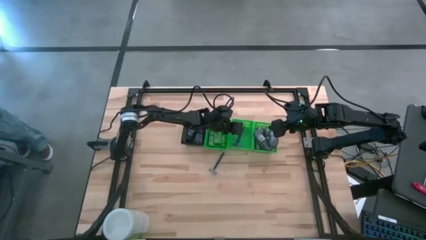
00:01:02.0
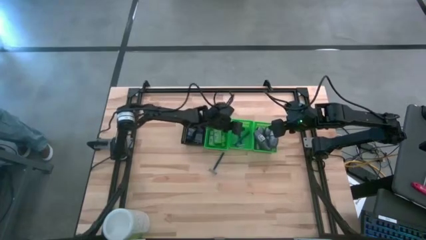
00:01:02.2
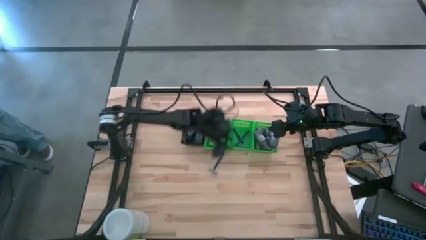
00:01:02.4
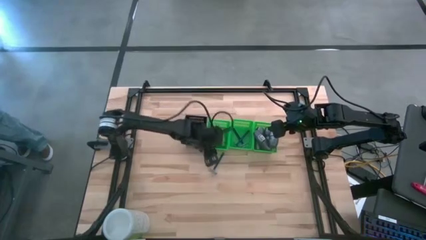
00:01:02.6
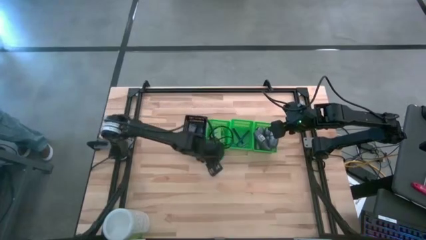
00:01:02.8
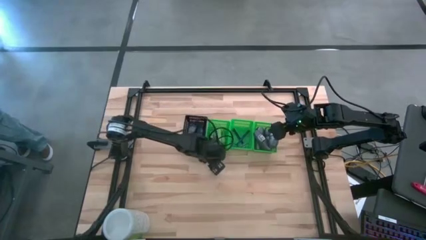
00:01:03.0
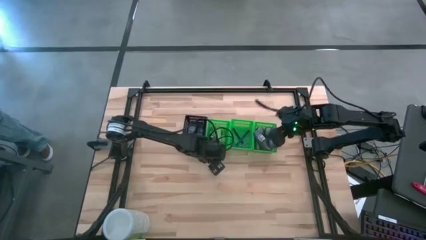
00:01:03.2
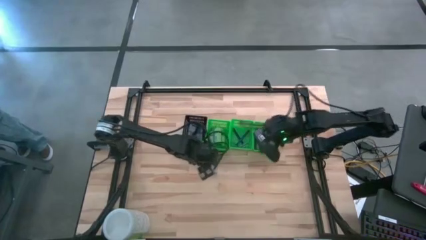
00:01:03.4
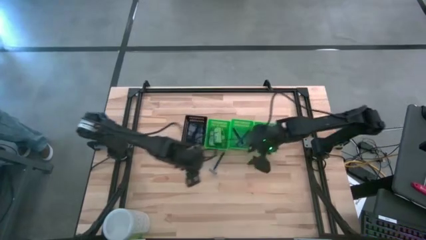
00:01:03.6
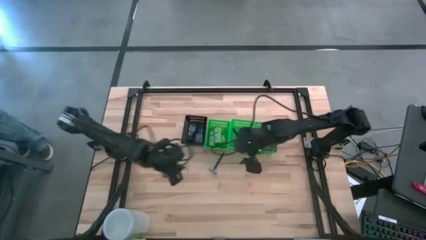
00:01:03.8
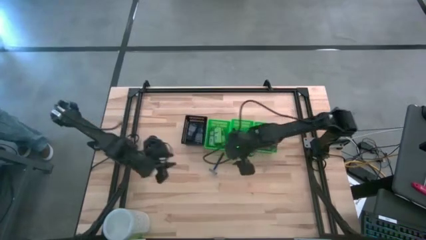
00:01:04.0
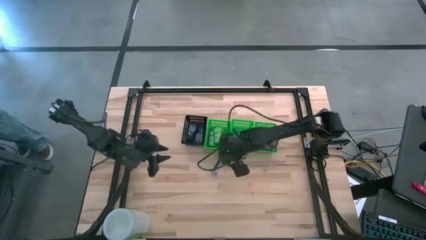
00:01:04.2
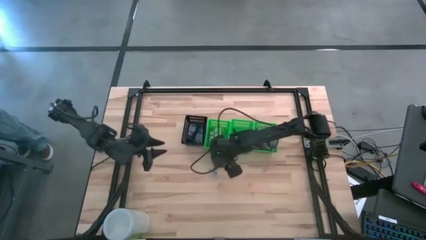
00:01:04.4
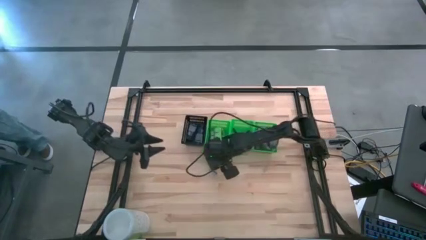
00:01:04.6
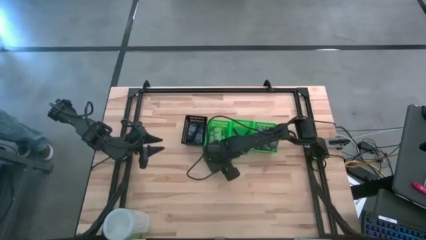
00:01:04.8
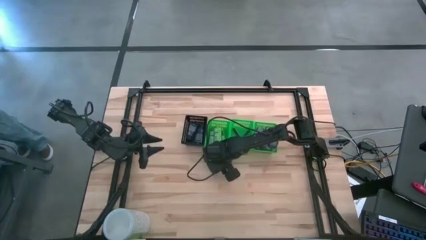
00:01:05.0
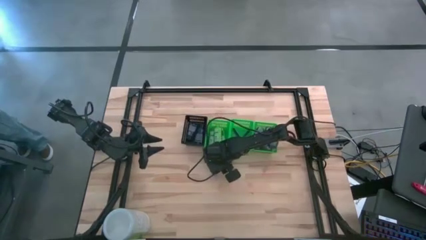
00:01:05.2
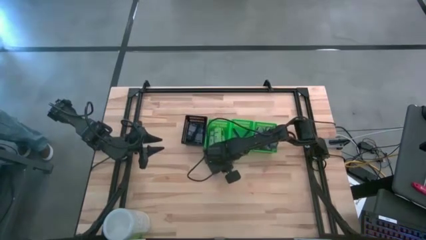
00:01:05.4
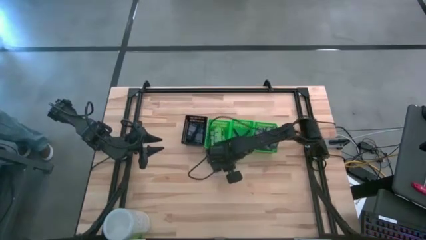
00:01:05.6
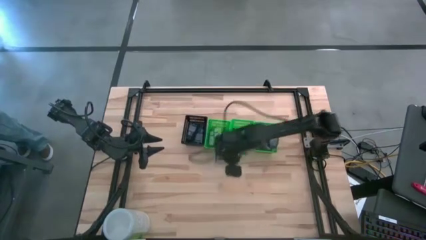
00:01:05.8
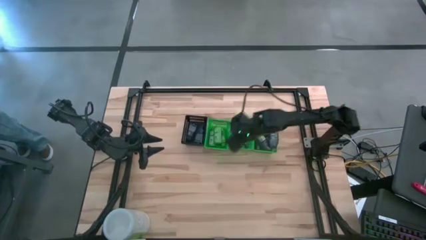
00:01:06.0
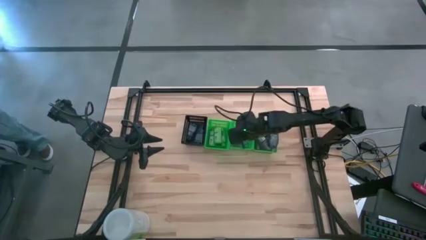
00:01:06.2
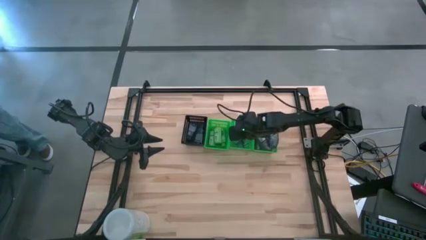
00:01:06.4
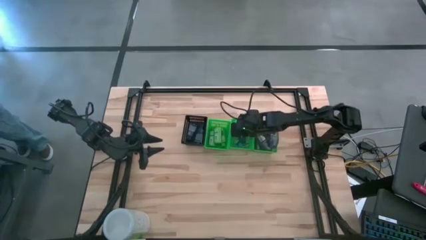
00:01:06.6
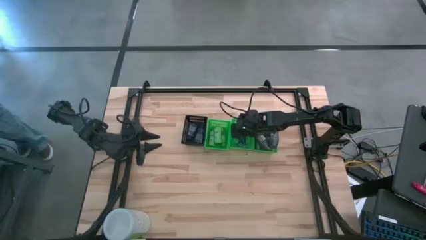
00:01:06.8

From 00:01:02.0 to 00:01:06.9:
Task: Pick & Place Travel size toiletries
Put the blue razor into the middle green basket

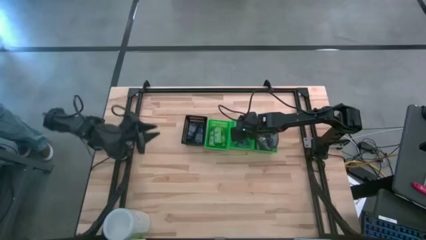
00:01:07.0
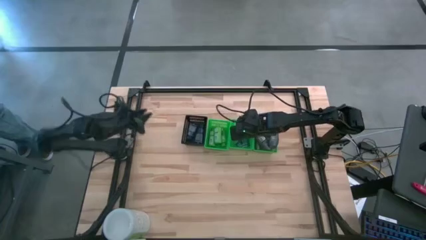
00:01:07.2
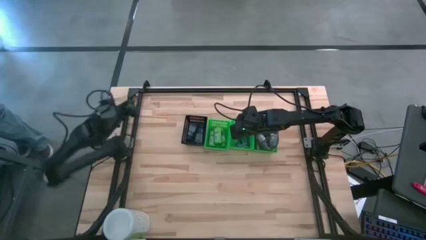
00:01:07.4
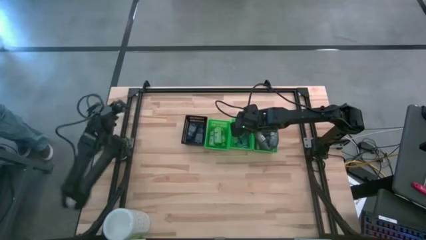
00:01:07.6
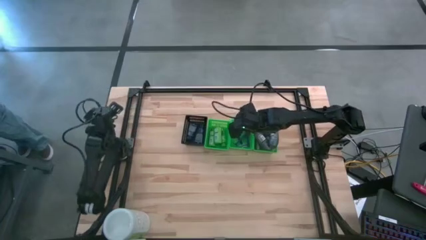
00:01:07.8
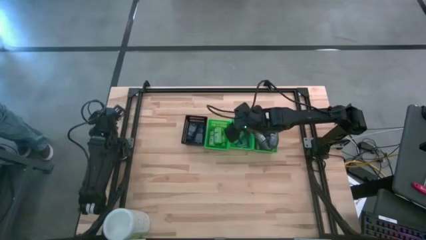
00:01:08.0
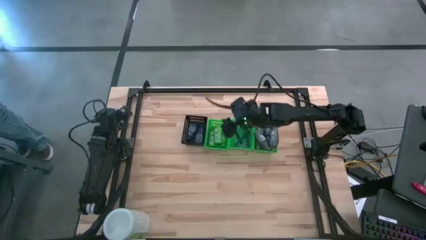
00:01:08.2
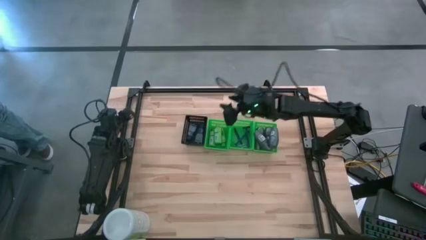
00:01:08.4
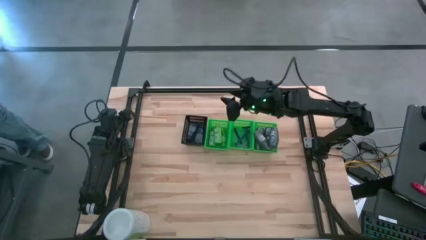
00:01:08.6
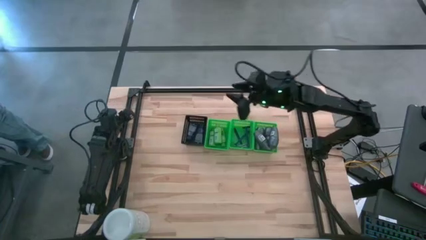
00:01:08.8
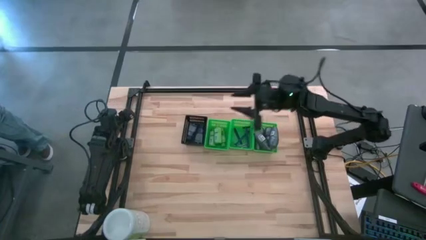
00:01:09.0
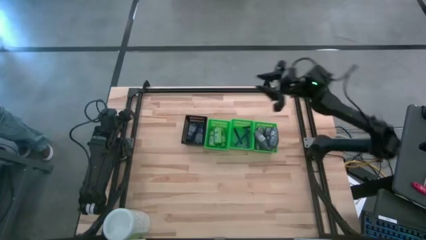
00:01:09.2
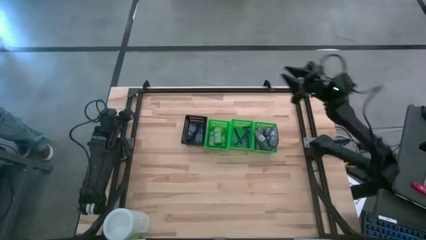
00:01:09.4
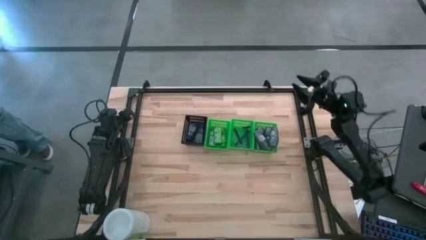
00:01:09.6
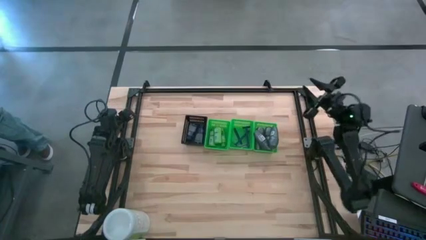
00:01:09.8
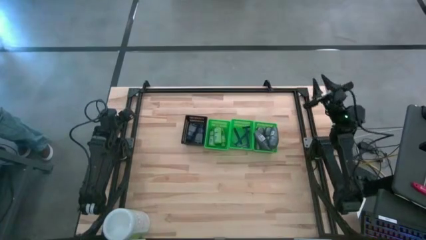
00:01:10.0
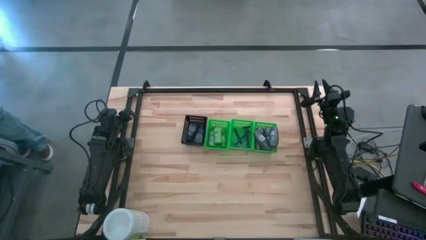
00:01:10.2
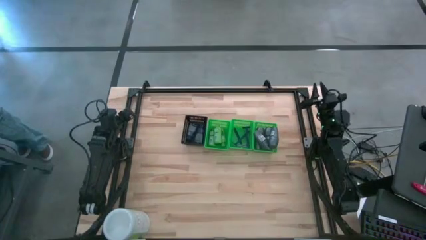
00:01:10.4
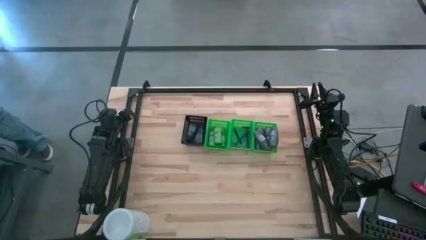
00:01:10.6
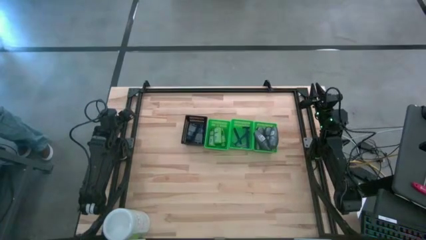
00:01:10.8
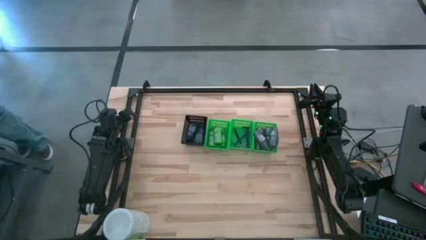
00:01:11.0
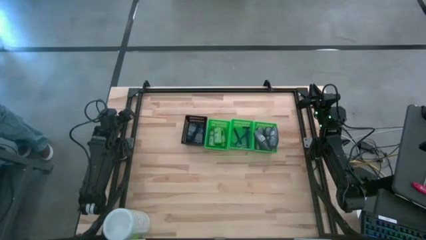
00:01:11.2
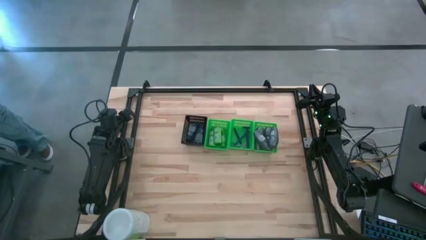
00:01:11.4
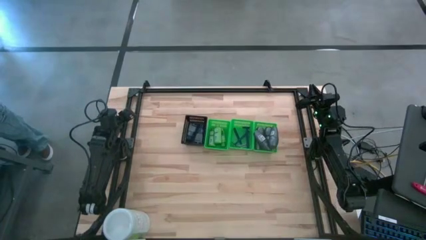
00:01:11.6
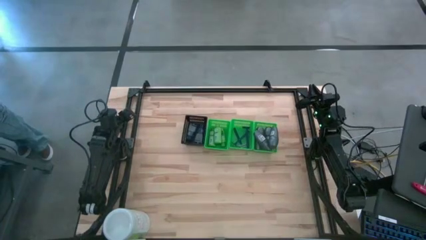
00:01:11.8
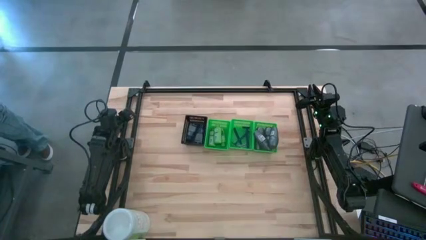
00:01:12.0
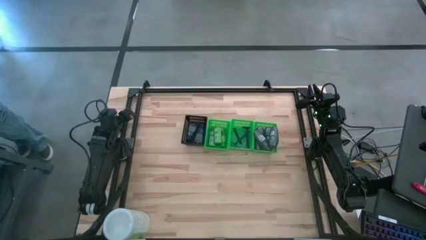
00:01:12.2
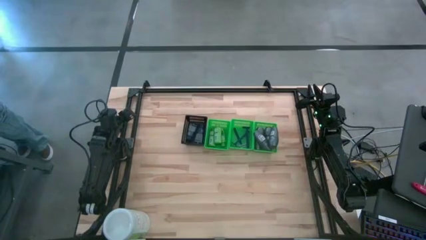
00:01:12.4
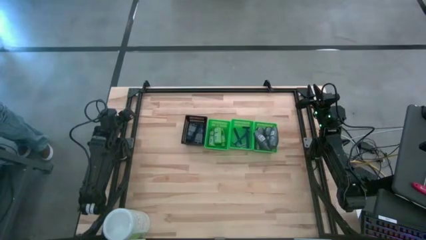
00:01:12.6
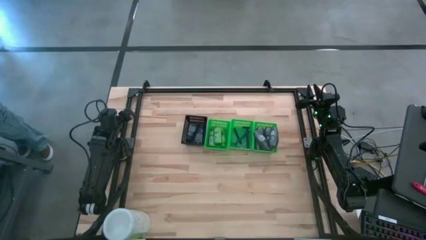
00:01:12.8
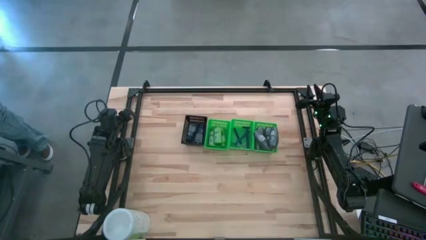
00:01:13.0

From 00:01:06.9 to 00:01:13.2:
Return to Home Position

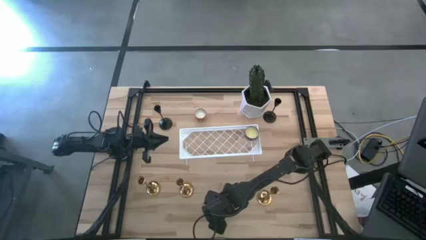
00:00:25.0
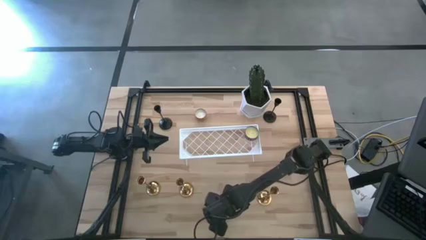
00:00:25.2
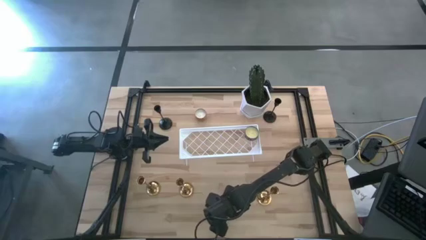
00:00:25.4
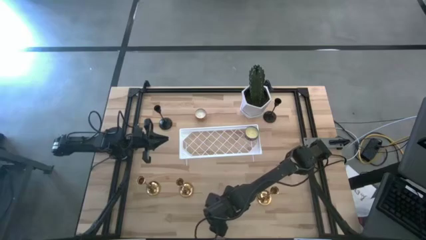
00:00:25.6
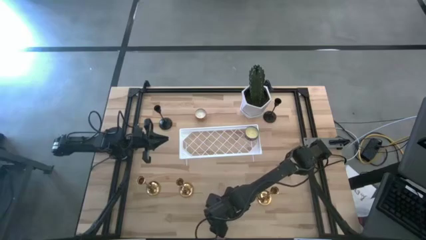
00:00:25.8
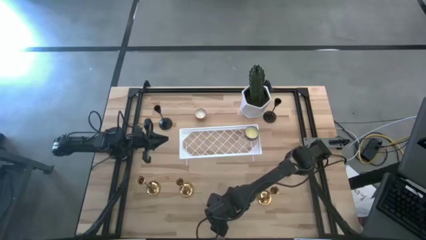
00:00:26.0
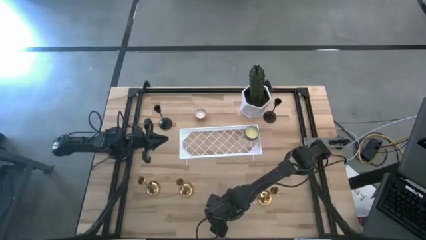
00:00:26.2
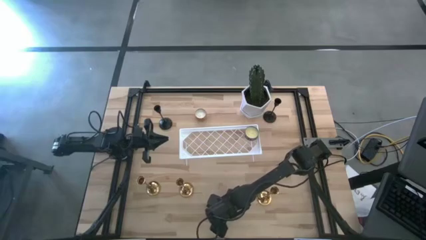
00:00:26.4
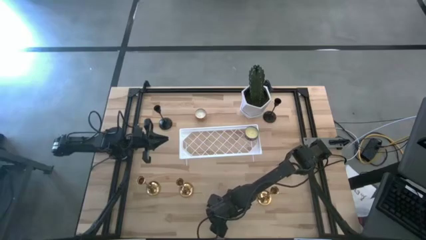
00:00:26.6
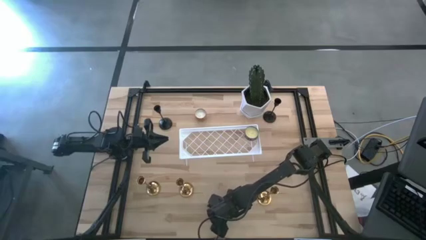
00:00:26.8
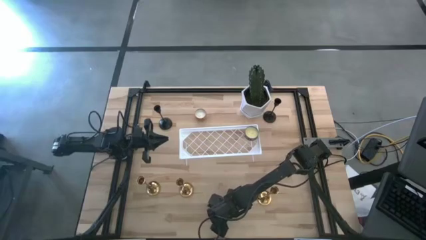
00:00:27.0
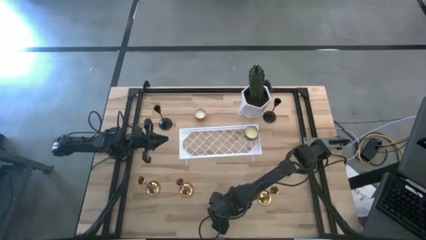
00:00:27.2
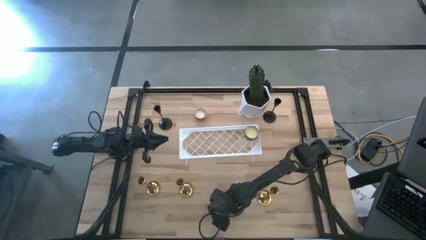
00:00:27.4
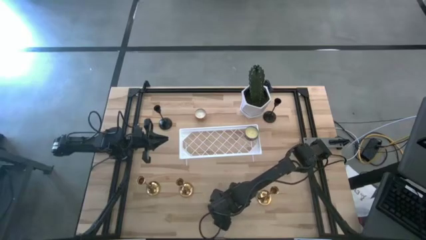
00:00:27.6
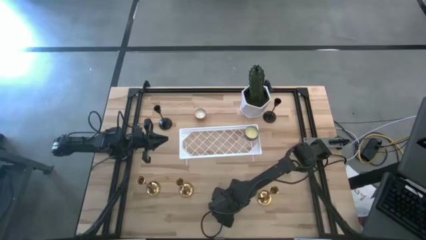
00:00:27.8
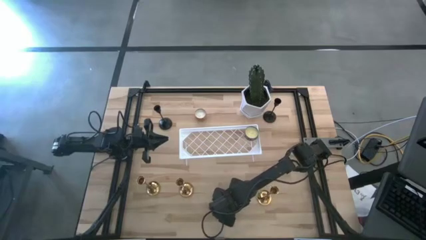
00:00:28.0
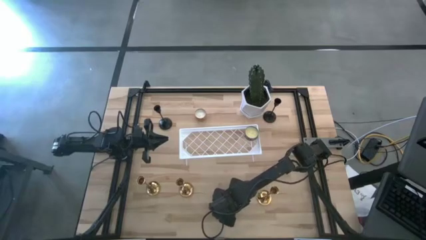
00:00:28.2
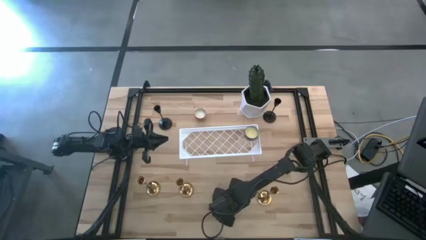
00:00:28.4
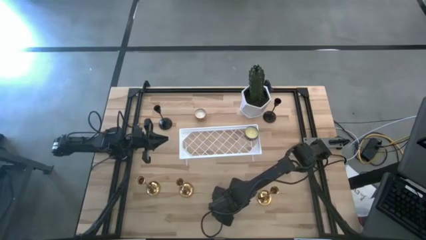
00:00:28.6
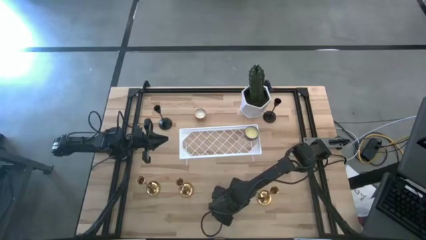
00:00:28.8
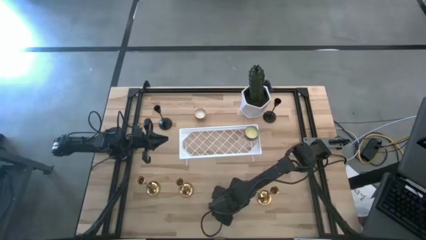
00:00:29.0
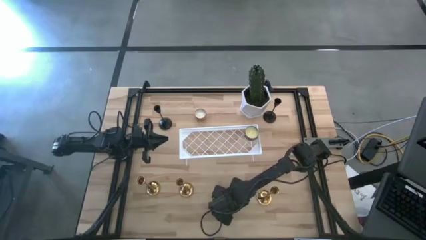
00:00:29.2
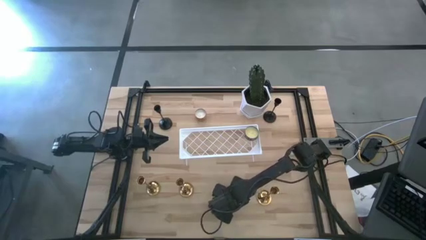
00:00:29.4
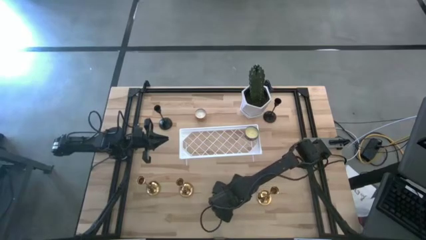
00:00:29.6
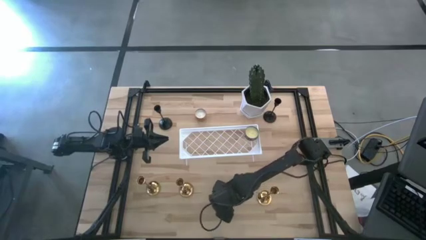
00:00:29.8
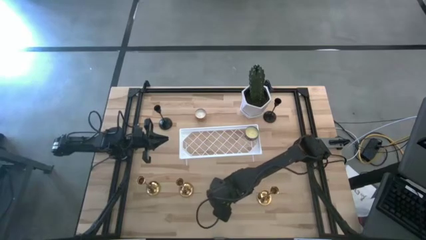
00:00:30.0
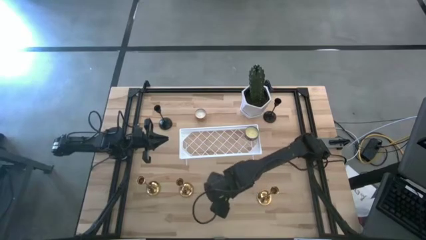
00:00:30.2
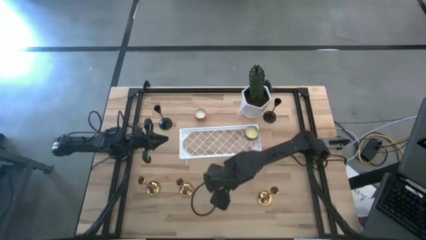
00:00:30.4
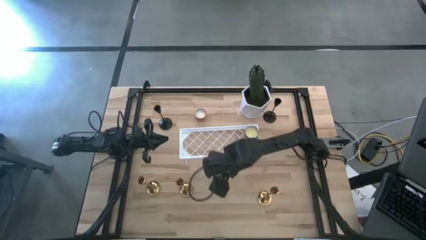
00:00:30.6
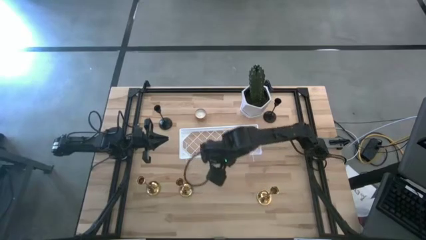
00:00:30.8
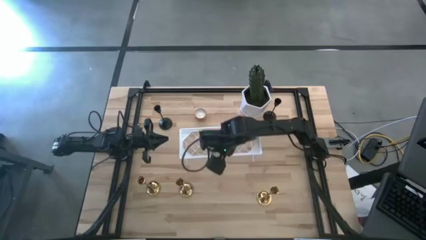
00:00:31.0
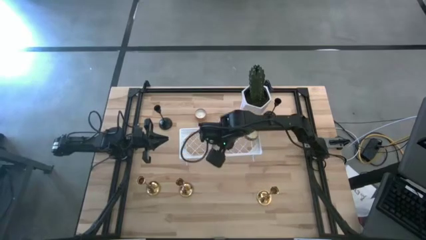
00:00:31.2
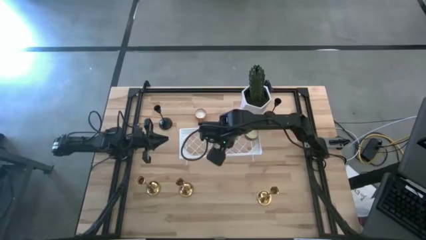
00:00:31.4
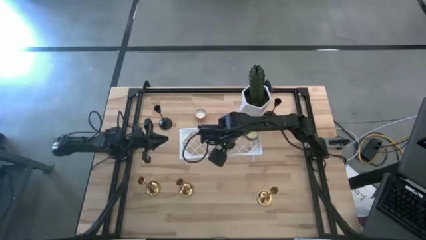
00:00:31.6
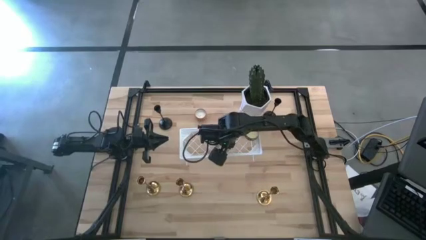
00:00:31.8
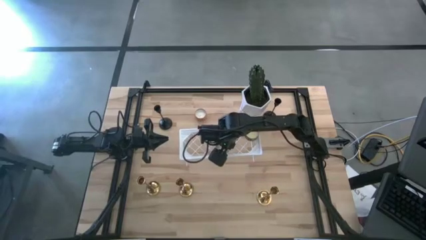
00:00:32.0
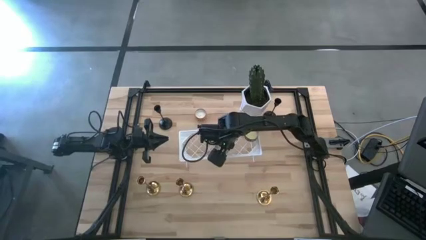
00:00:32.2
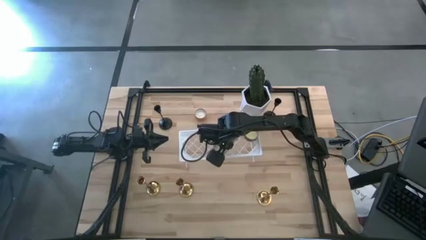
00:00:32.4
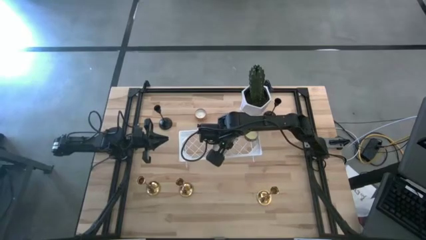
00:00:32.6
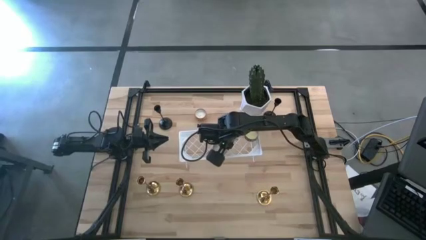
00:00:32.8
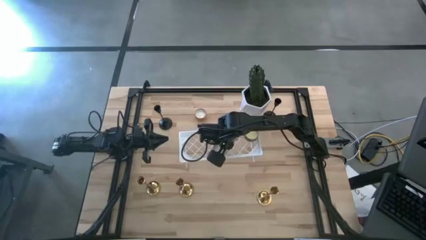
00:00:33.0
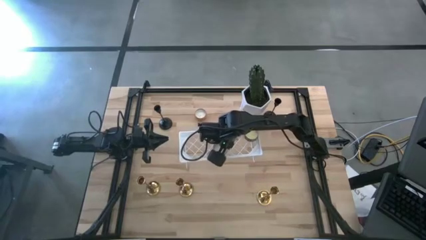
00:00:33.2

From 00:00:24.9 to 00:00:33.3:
Task: Pick & Place candle stick holders
Put the blue scented candle on the shelf
